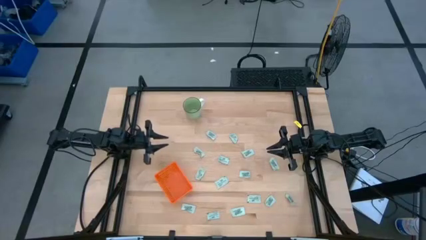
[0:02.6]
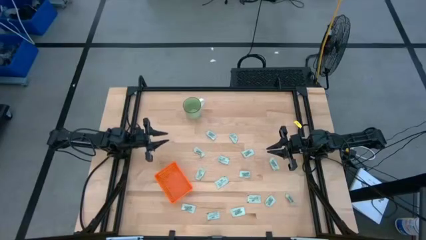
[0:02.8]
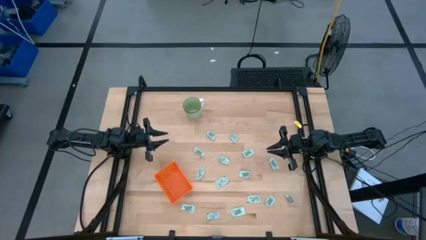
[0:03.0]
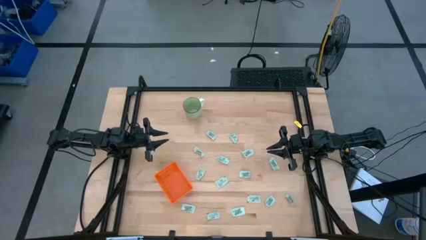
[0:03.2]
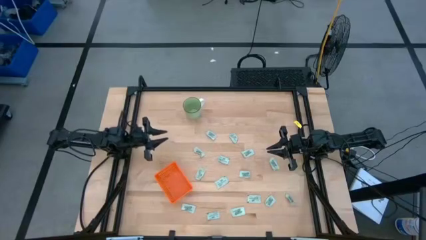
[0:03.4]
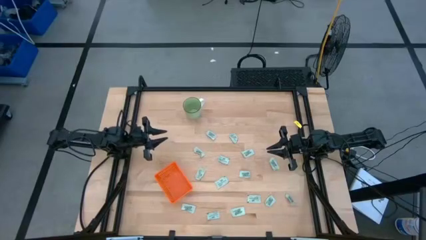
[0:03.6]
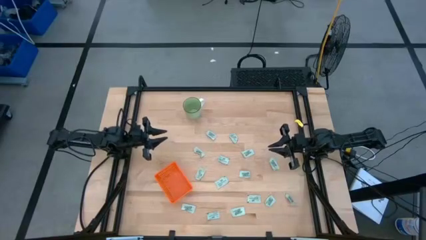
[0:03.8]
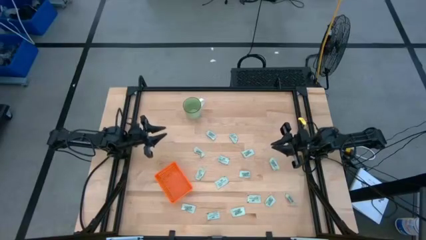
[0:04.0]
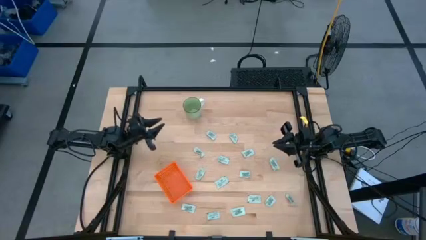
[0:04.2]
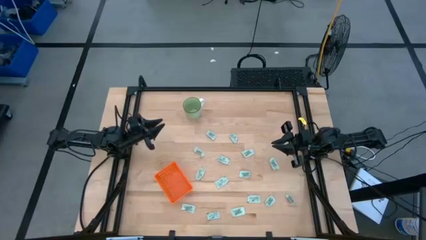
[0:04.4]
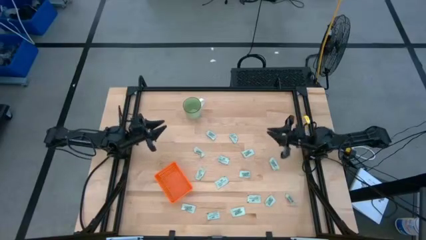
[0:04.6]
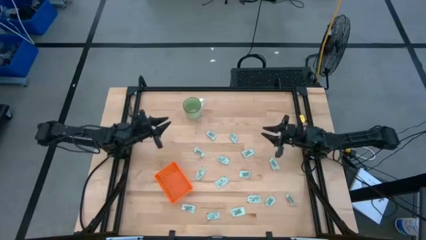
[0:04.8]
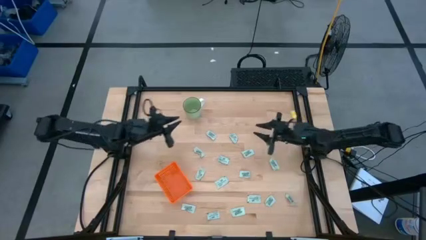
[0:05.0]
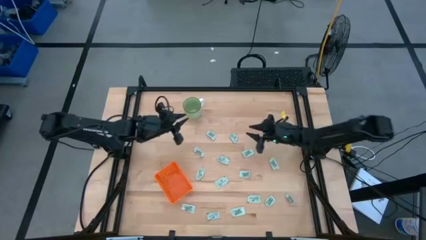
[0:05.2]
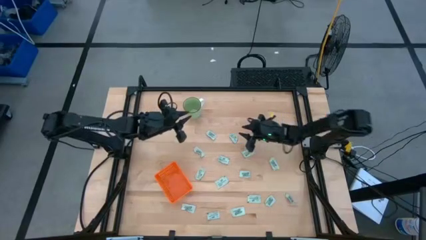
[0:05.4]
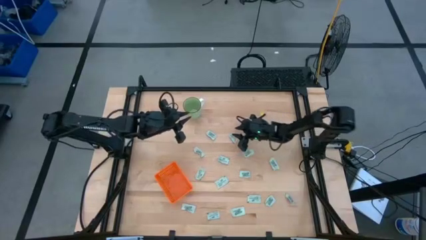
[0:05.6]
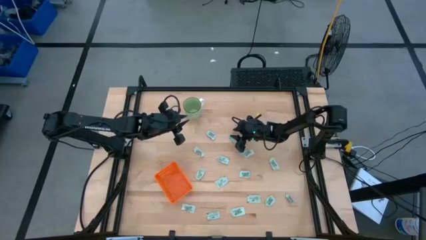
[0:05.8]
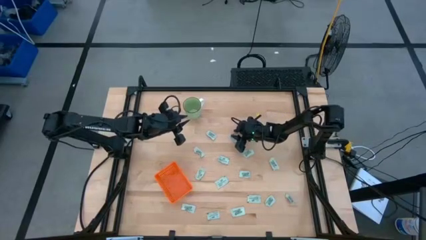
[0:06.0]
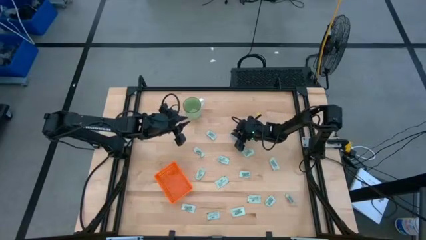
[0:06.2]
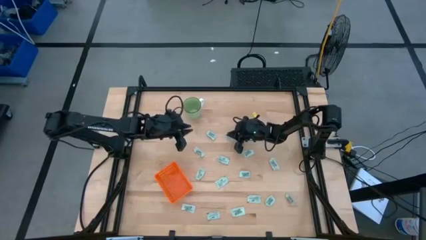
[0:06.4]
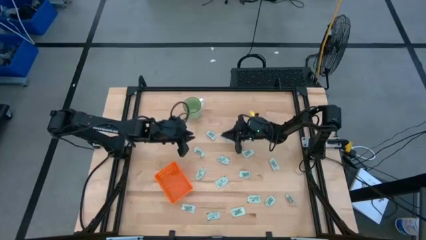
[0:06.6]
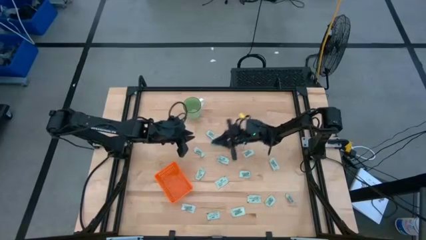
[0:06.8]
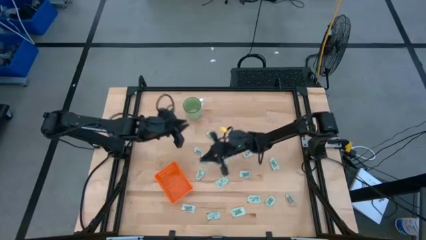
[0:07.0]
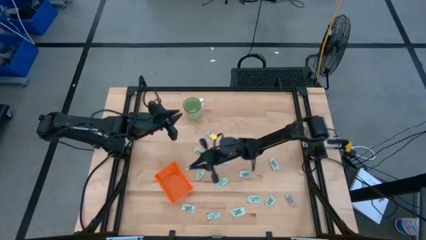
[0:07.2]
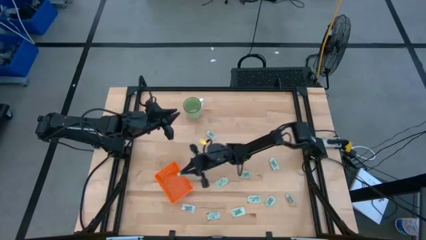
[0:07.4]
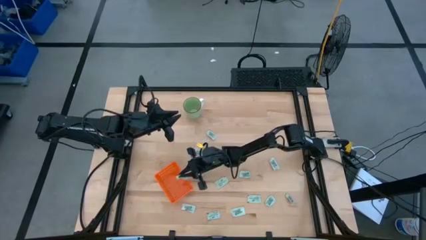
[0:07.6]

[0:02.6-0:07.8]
Task: Pick and place Stevia / Truvia into bins
Put the stevia packet into the orange basket

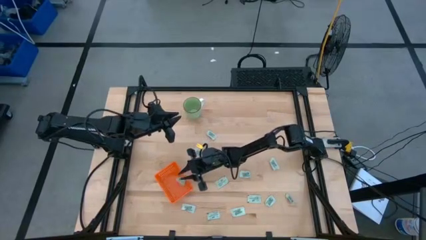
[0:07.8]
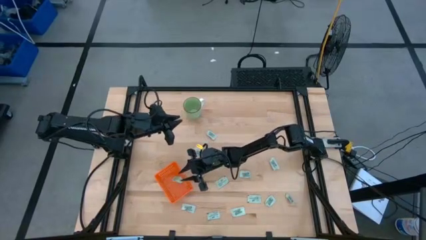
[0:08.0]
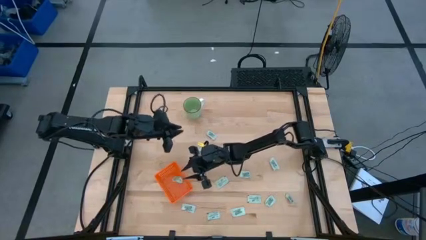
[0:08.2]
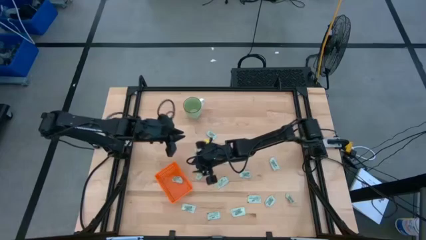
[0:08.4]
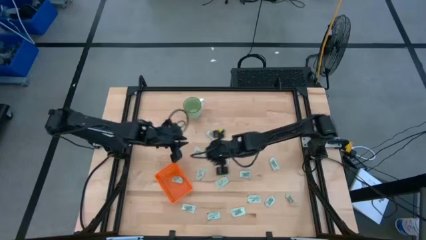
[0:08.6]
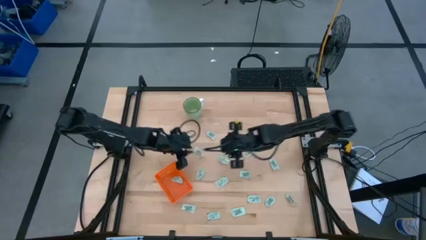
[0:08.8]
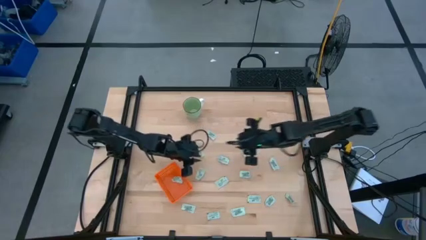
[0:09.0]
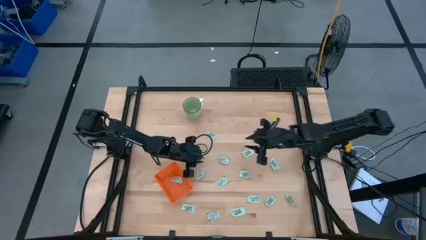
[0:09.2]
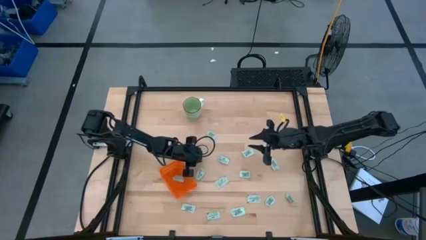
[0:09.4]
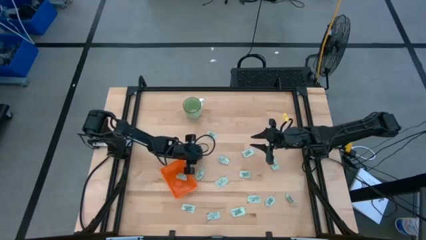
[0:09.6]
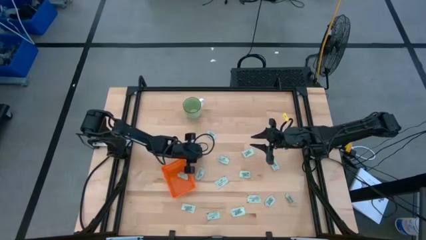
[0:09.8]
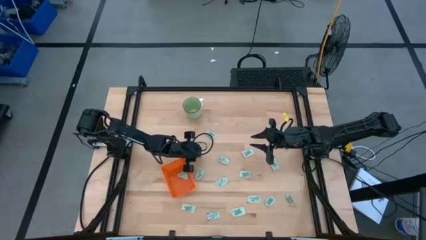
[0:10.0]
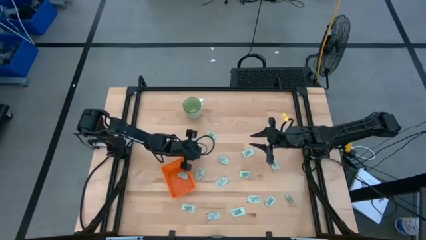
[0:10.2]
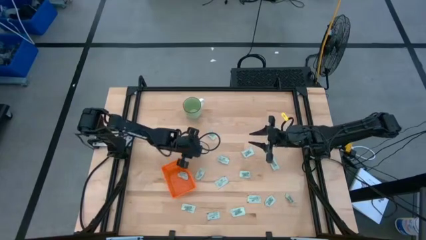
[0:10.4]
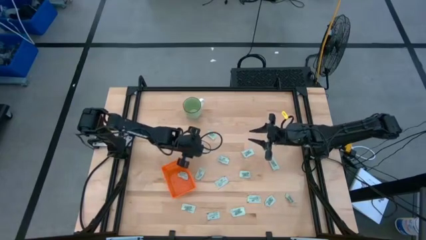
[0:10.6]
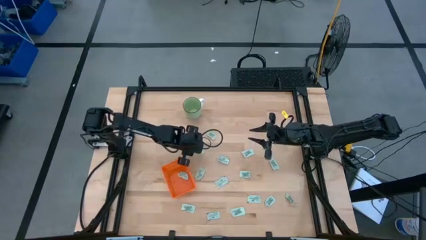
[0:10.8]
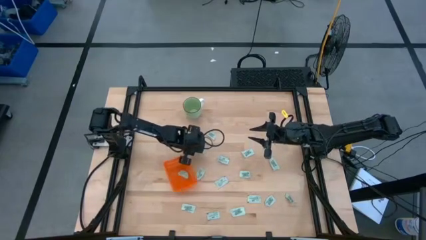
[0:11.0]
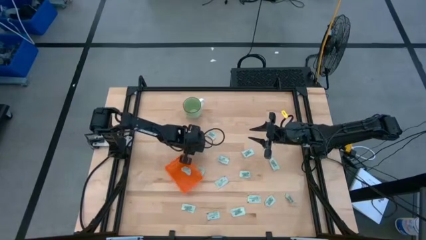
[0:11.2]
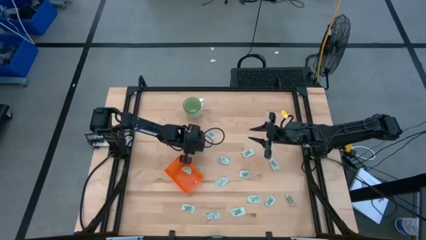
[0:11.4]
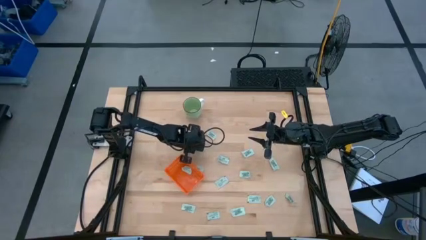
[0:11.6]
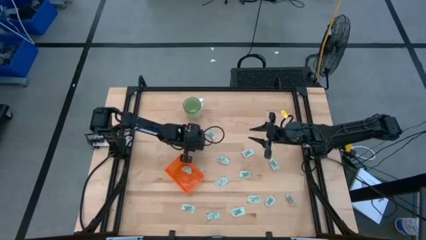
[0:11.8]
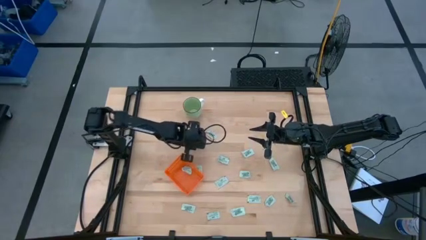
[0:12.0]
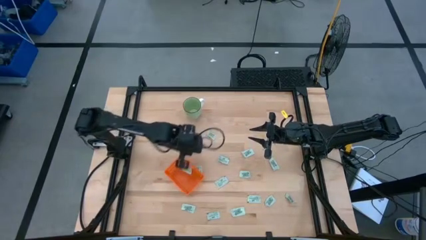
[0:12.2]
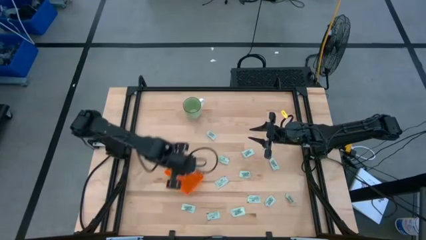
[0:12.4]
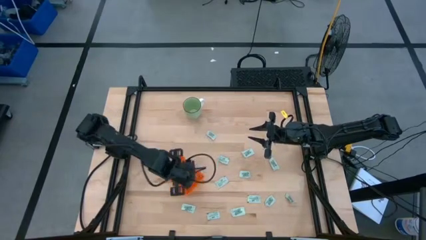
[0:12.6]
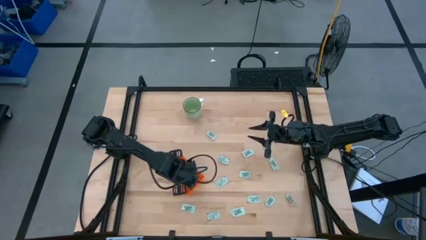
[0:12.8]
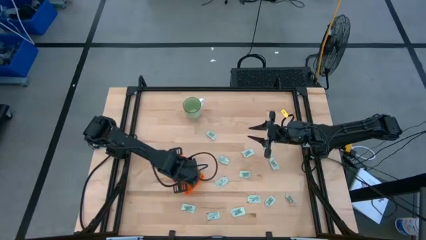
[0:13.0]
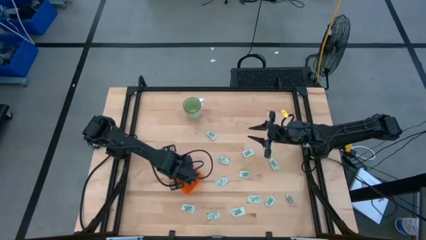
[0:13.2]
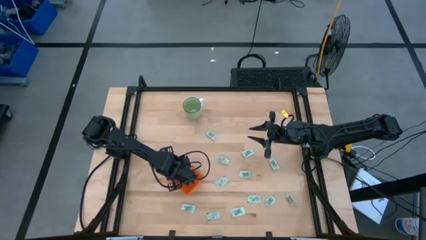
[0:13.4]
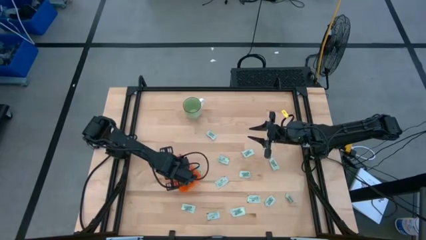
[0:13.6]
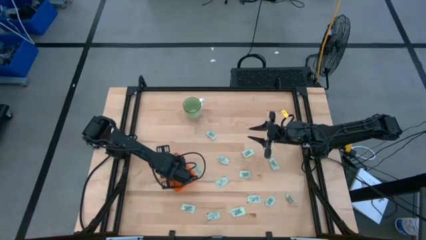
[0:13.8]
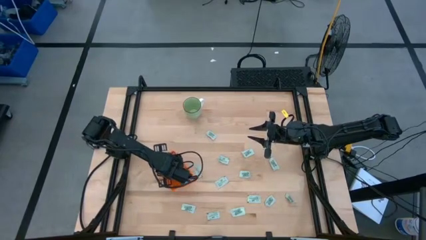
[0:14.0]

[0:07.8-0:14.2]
Put the stevia packet into the orange basket

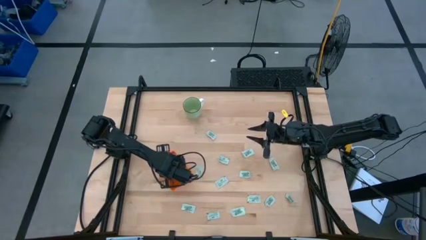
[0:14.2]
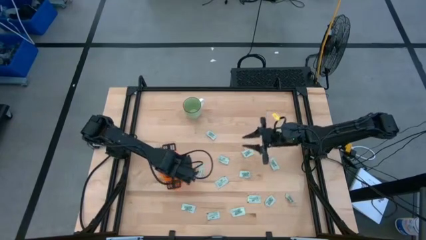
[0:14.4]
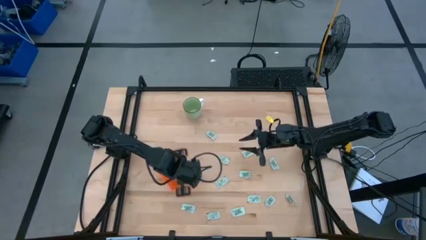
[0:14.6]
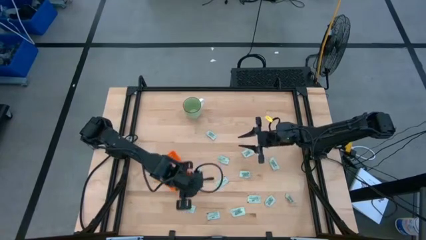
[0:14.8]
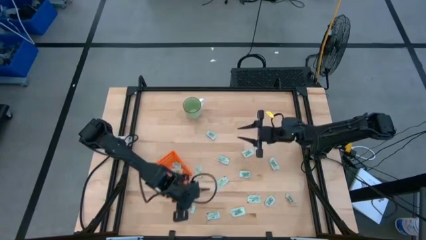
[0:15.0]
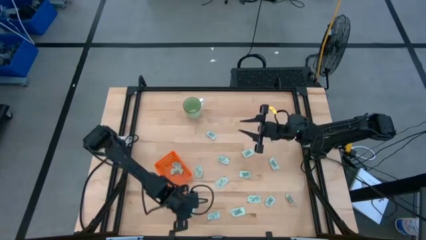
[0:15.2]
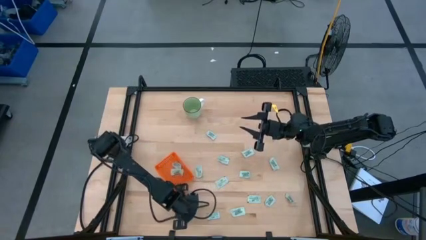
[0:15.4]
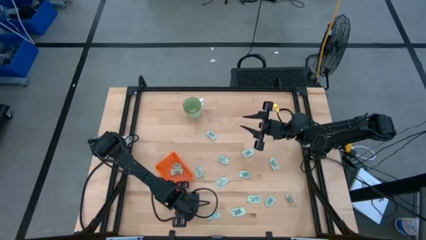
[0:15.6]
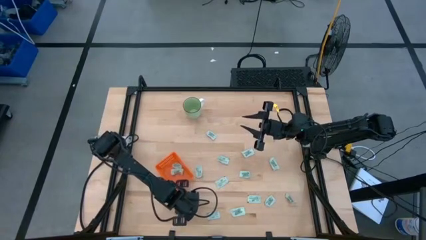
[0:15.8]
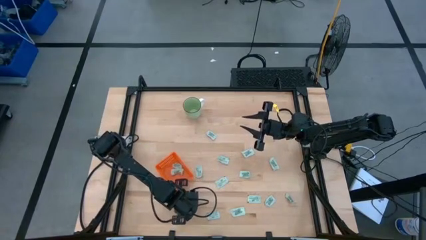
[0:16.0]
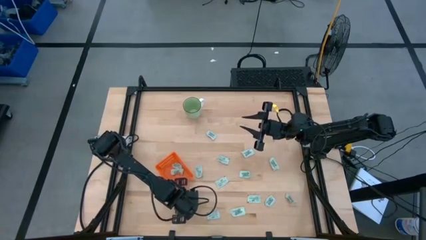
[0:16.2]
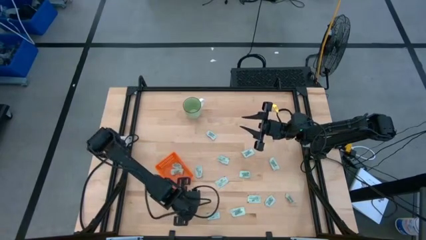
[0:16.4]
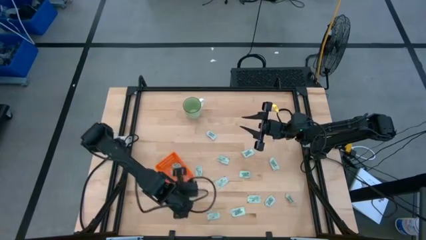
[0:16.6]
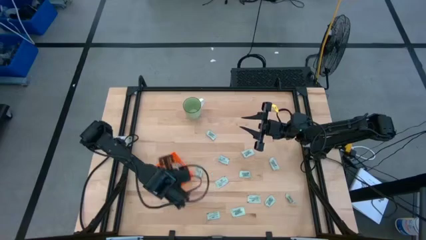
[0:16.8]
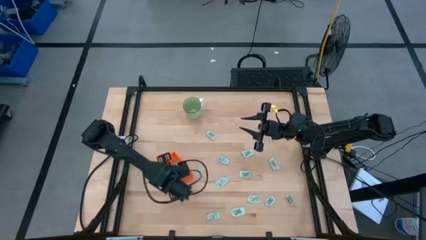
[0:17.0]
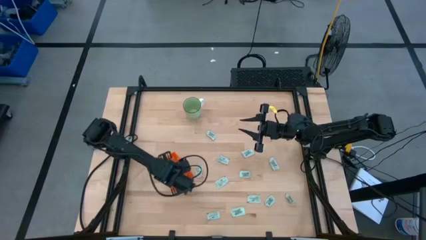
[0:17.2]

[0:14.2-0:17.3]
Put the stevia packet into the orange basket

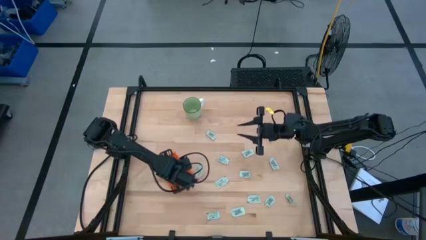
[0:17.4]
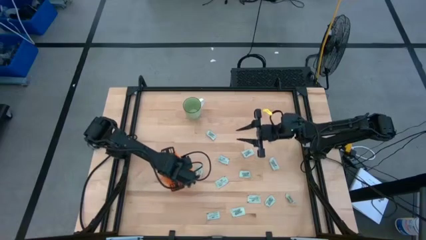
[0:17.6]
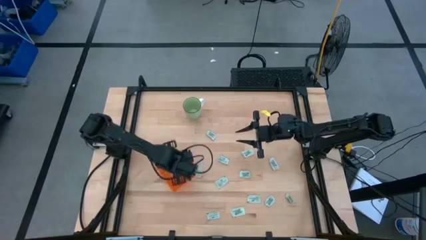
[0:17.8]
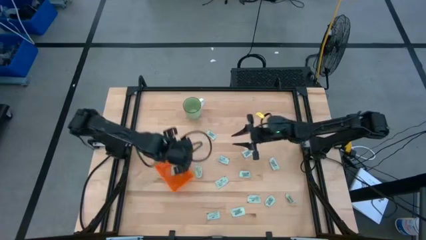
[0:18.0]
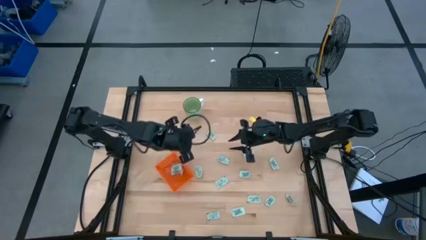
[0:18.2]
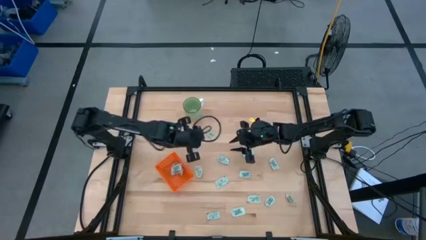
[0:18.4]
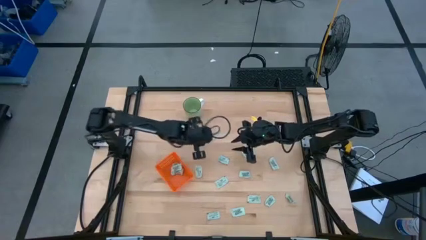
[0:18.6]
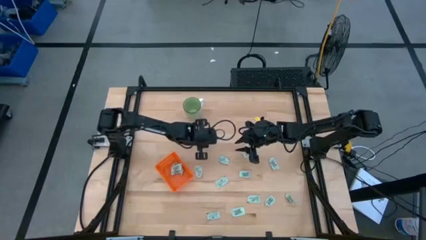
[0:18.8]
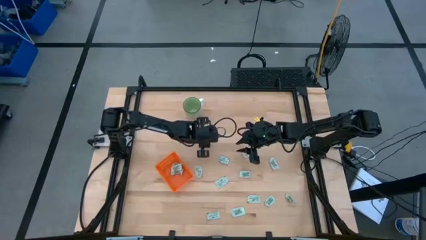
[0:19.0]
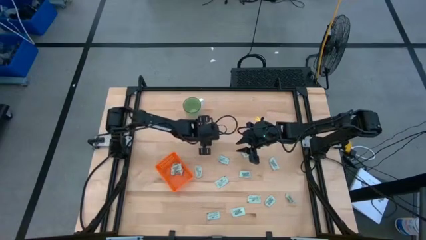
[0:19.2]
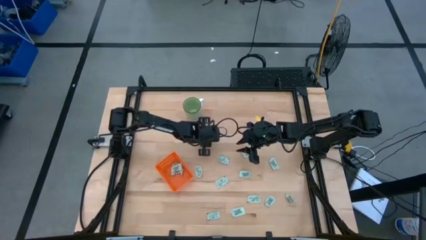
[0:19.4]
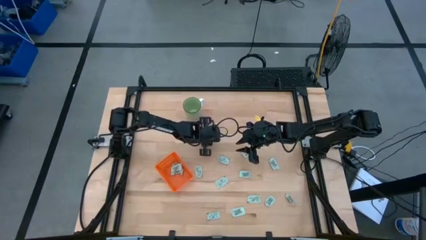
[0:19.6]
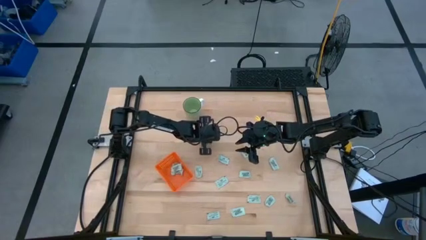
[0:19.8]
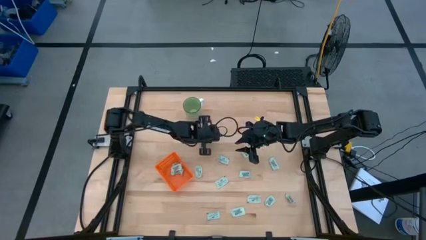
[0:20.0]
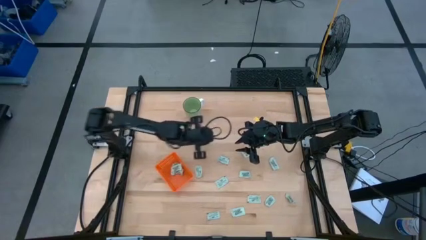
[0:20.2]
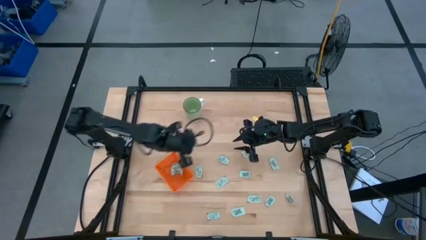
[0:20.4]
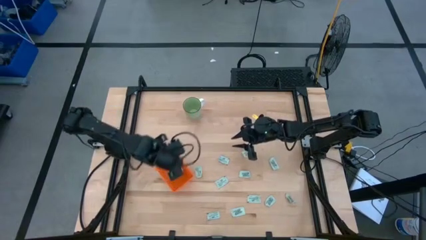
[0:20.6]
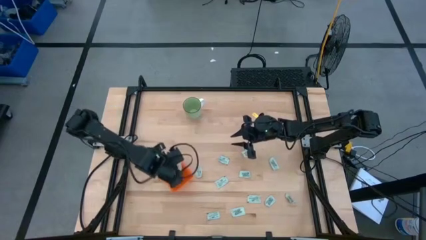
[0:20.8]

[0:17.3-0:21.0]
Put the stevia packet into the orange basket
